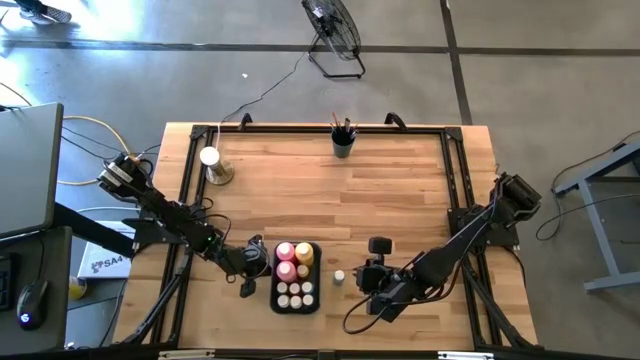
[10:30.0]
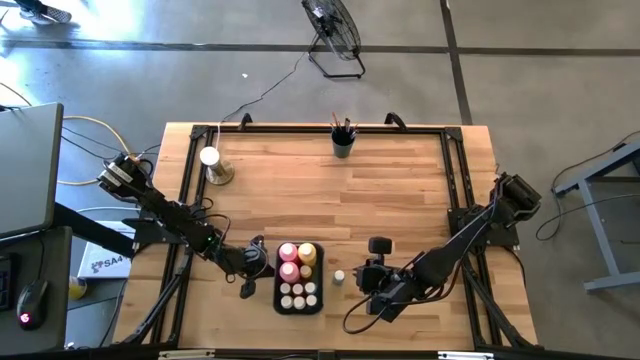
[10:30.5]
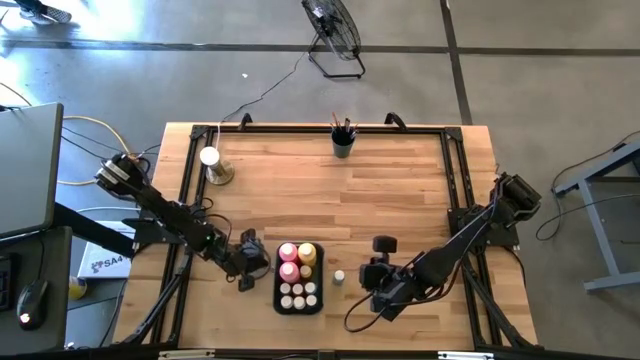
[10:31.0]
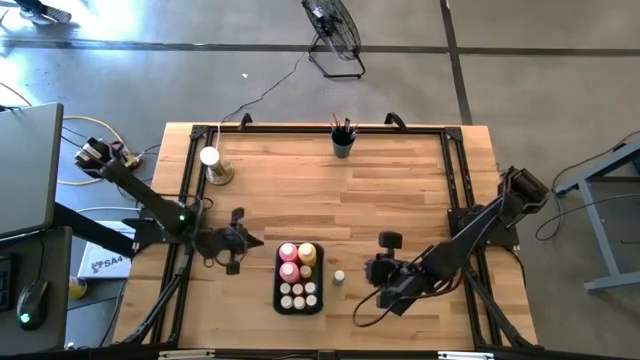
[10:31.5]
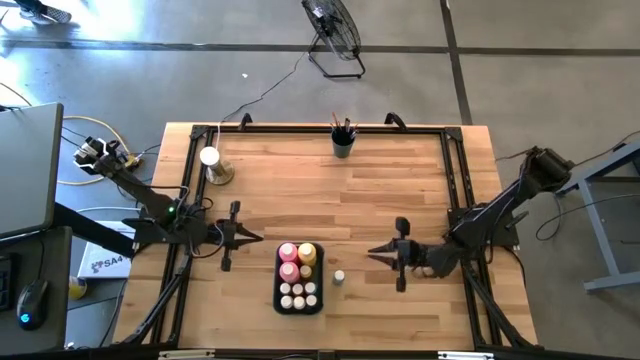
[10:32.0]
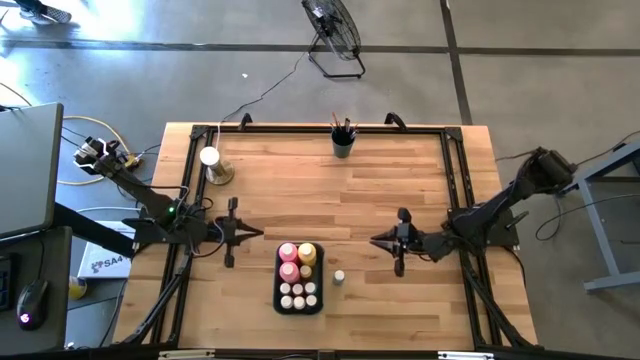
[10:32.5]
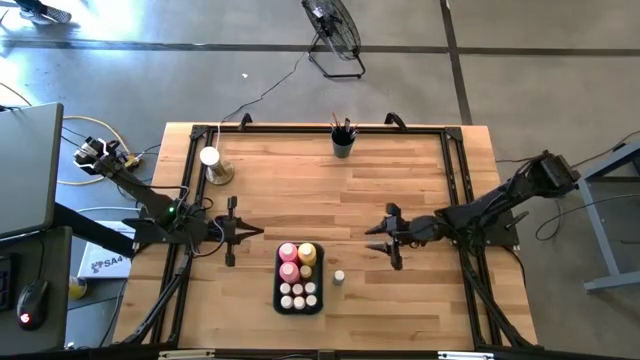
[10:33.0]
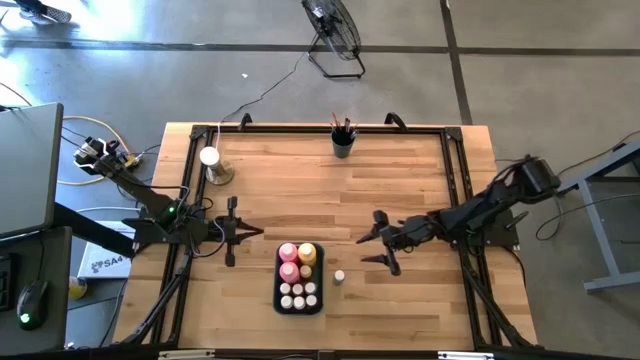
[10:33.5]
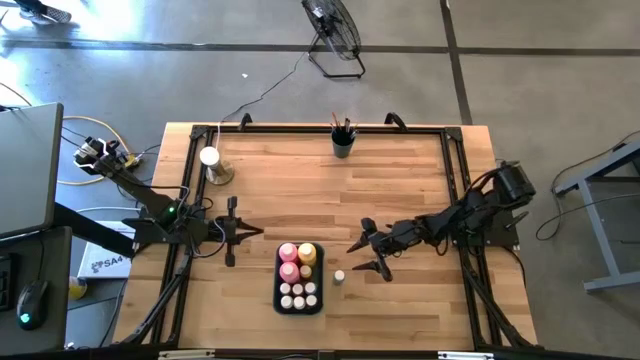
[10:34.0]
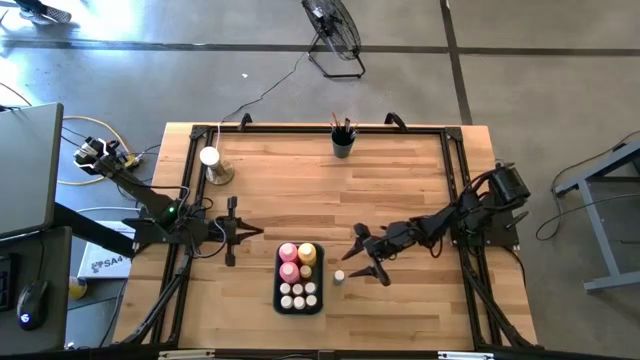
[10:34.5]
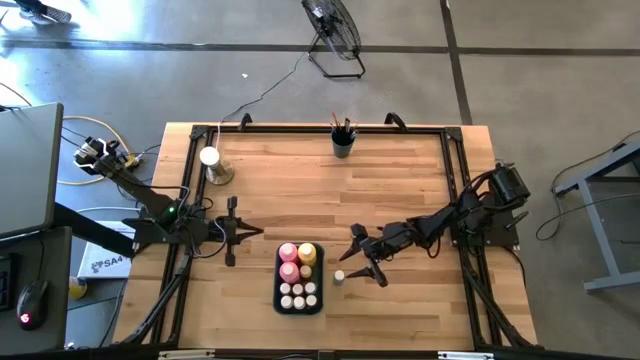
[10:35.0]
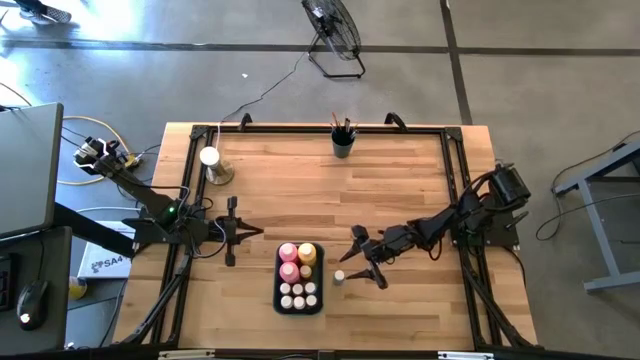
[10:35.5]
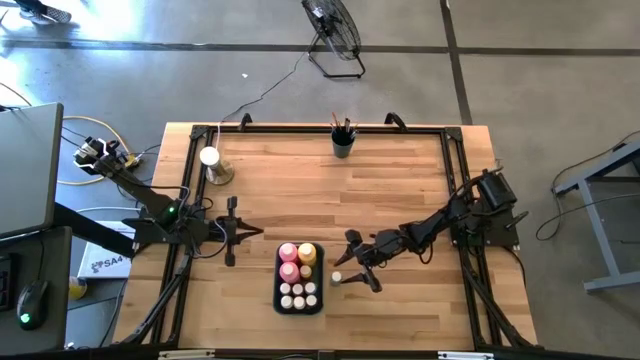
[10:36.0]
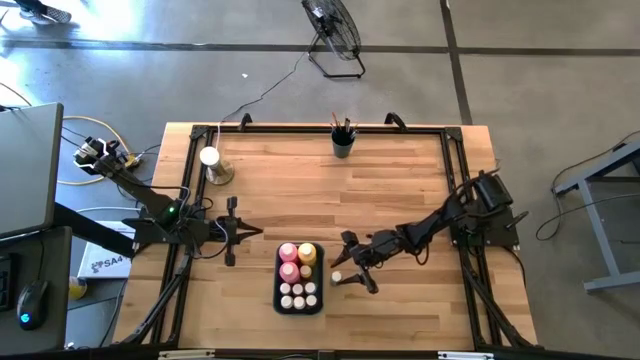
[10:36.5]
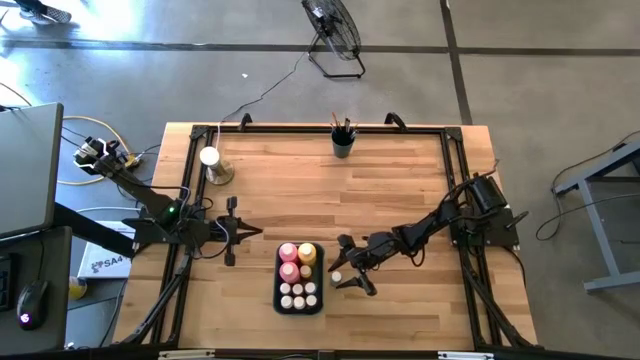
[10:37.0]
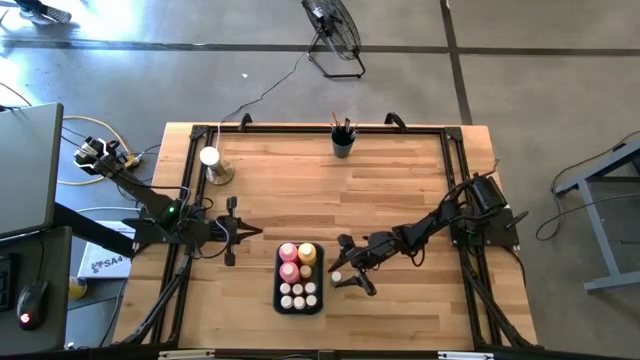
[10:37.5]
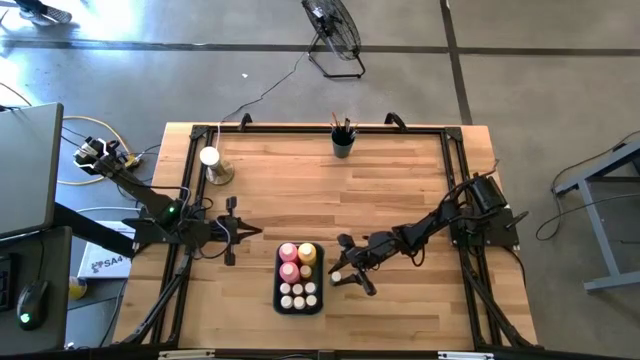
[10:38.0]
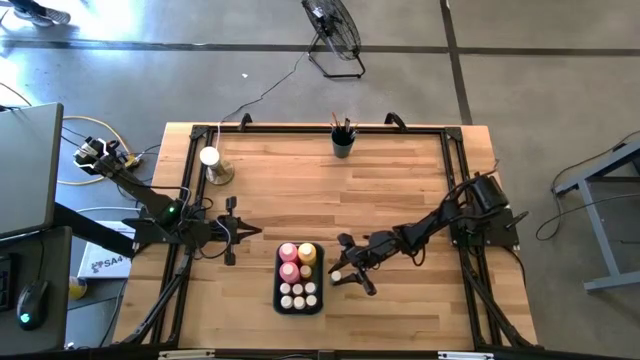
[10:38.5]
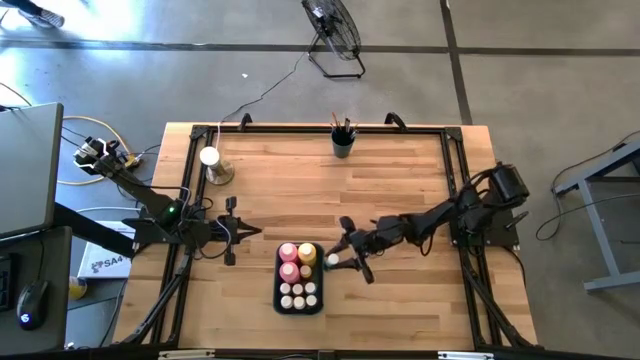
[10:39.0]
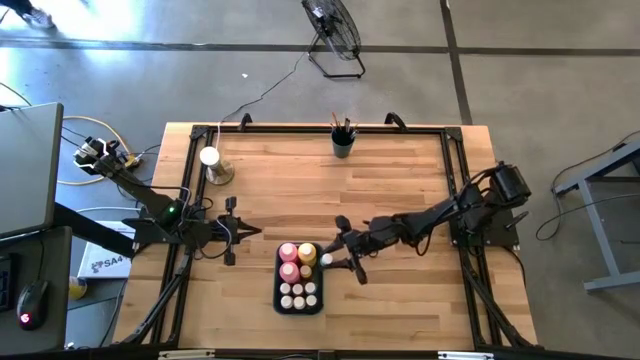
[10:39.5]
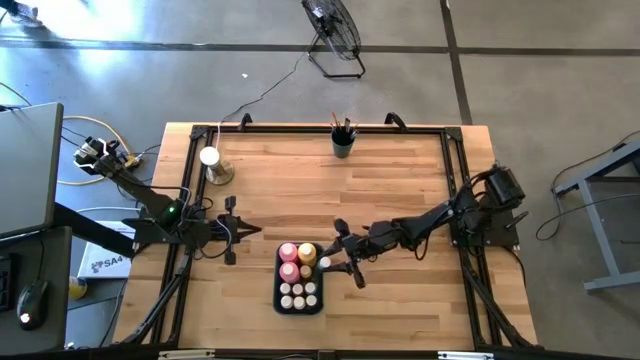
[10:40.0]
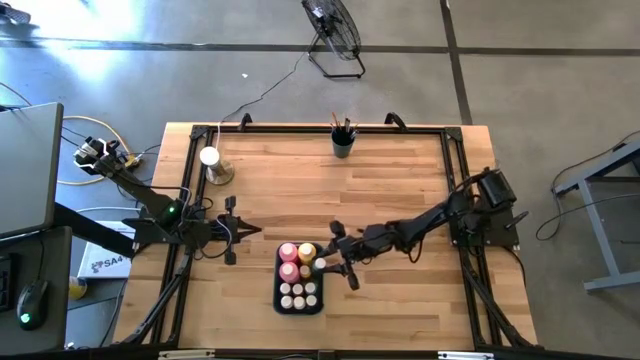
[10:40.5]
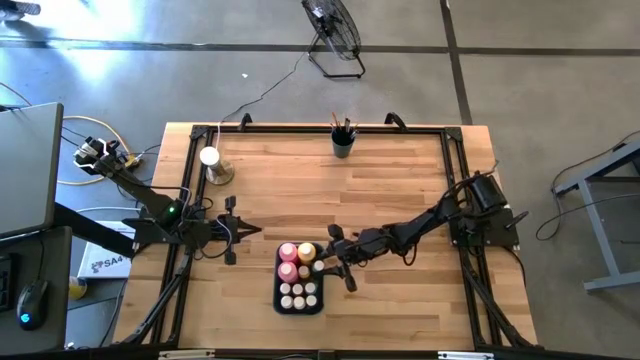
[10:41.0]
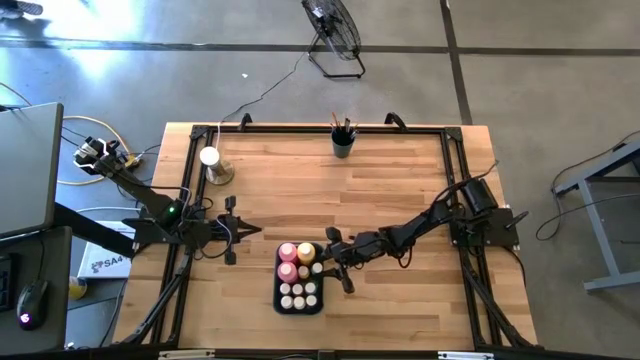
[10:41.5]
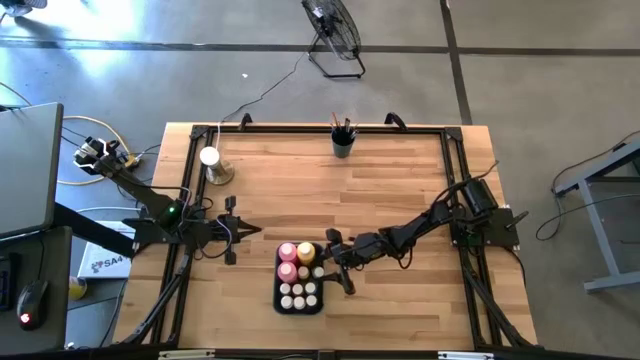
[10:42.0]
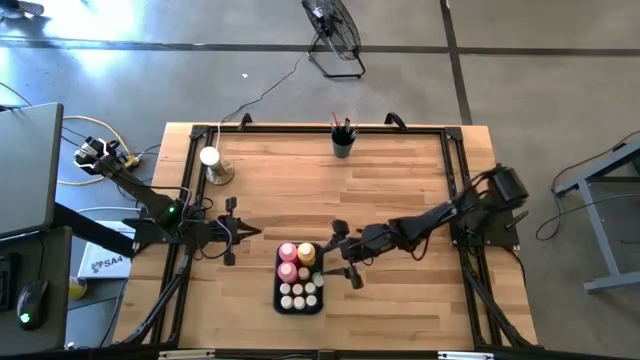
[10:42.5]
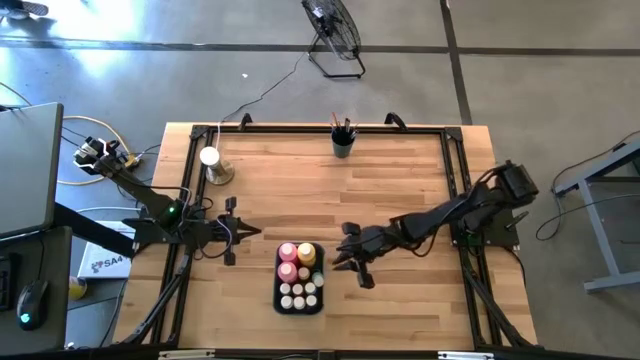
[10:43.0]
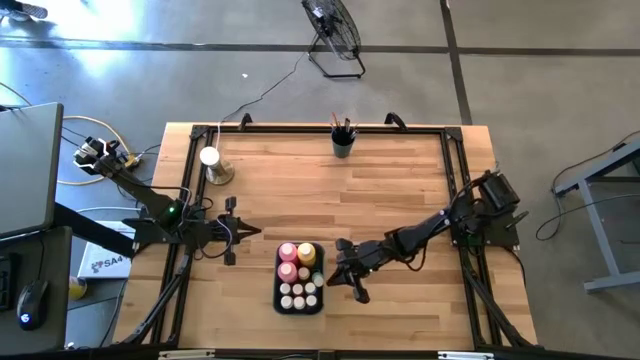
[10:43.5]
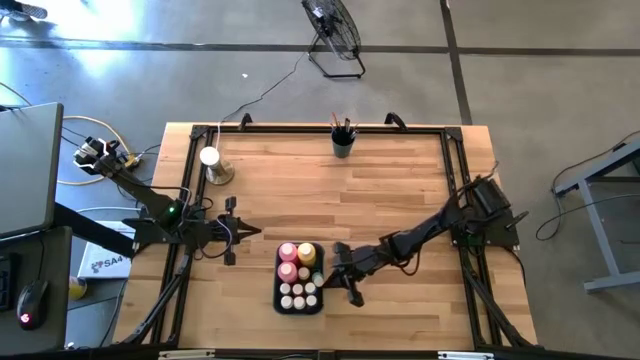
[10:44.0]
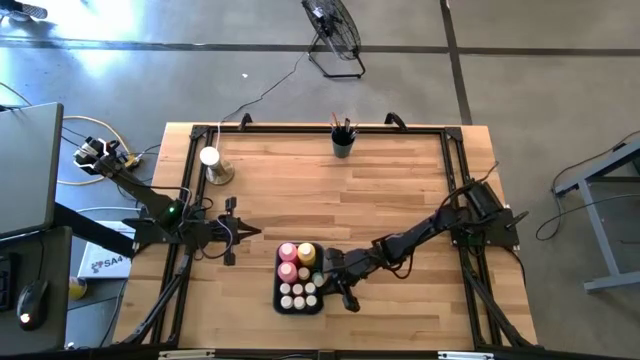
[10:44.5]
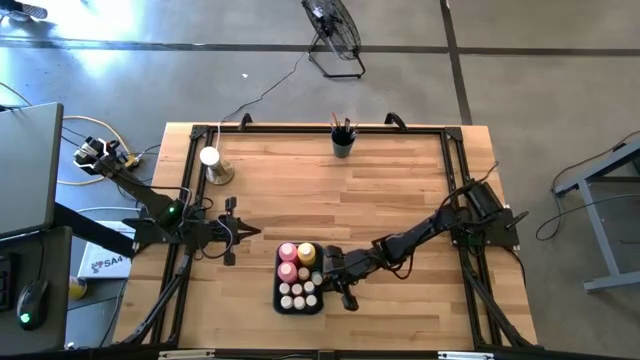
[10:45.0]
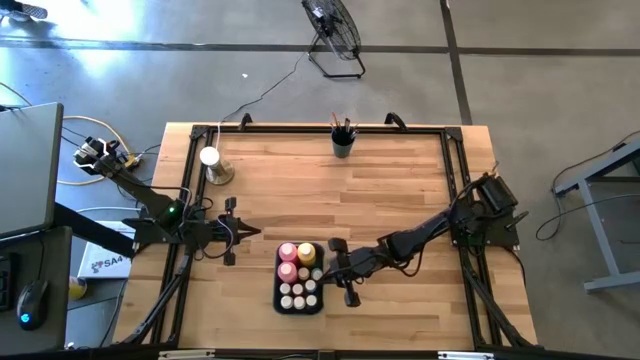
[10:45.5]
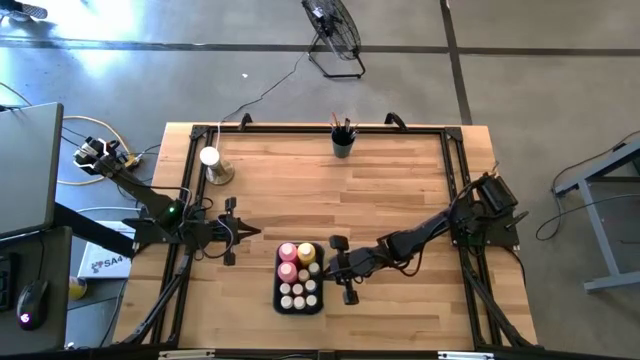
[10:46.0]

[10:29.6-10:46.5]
Task: Pick & Place Paint Supplies
Put the green paint bottle into the green bin
